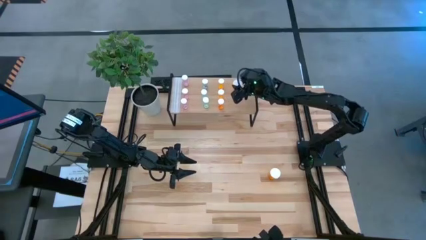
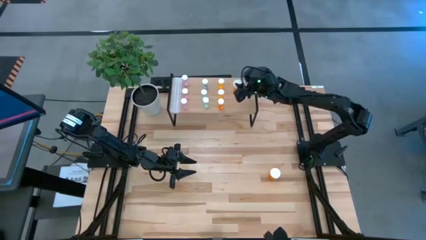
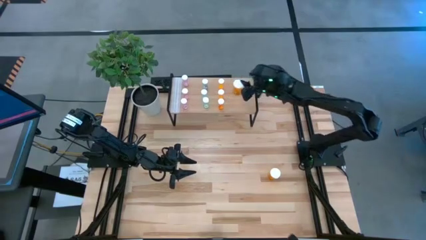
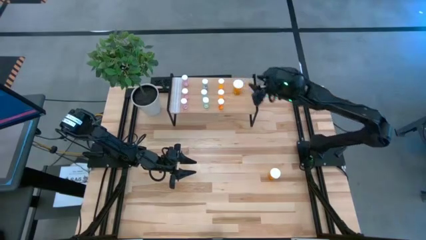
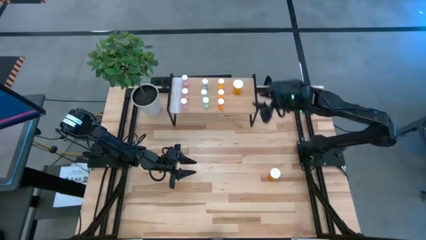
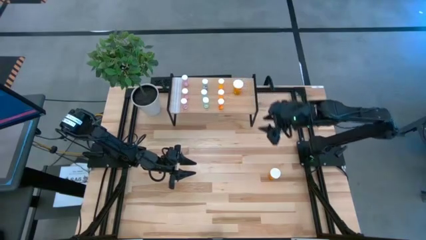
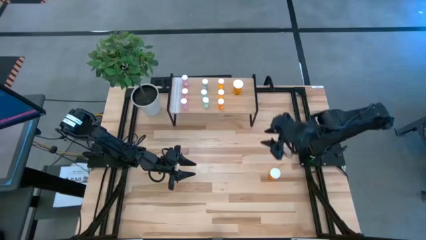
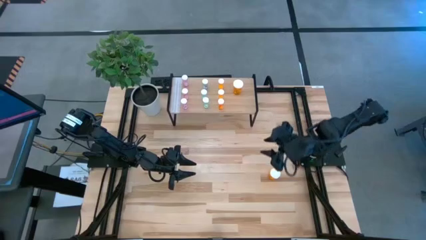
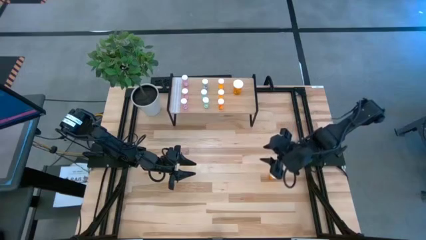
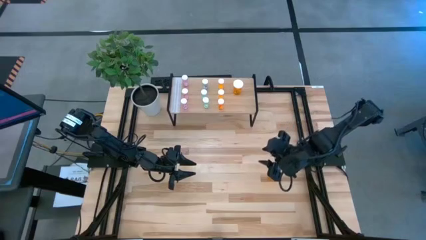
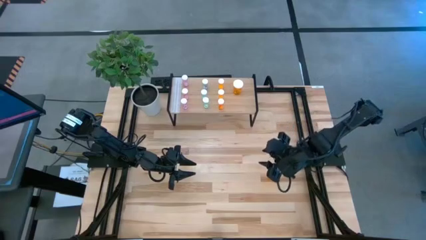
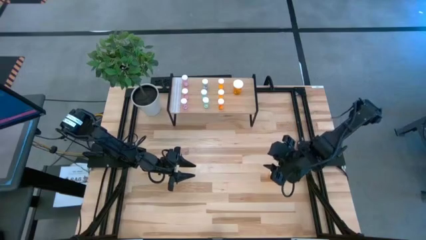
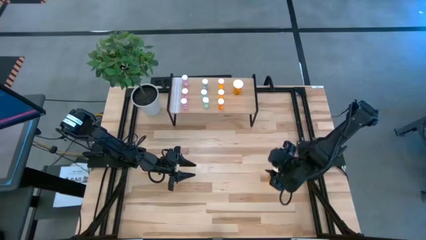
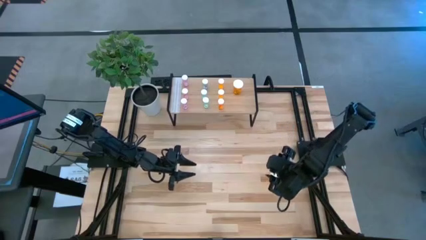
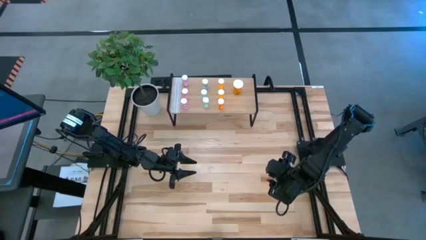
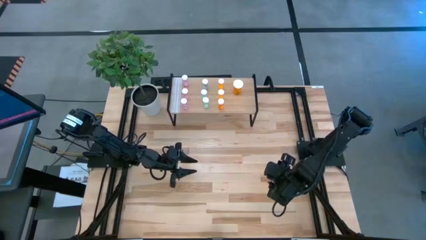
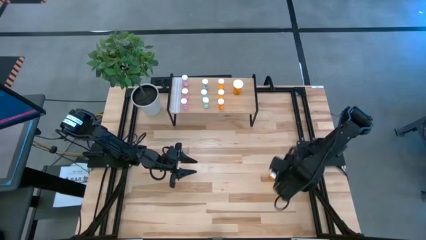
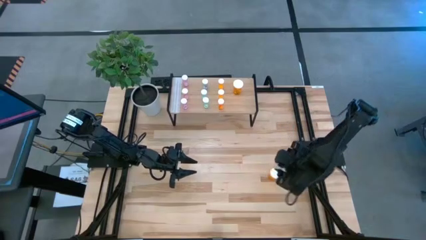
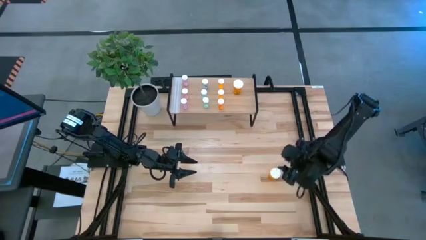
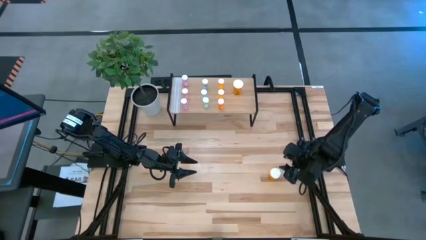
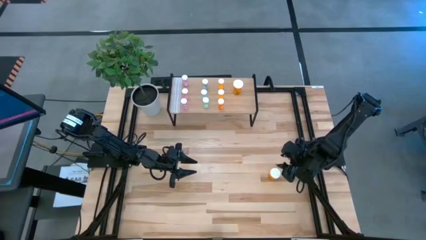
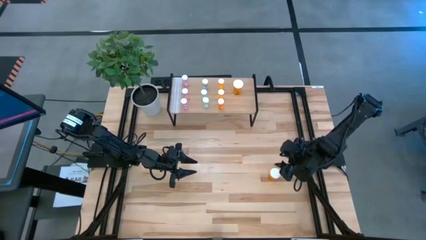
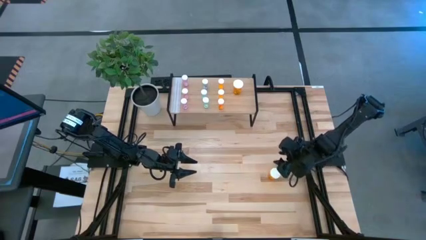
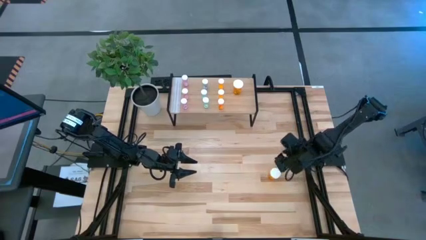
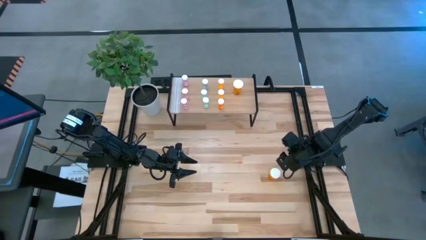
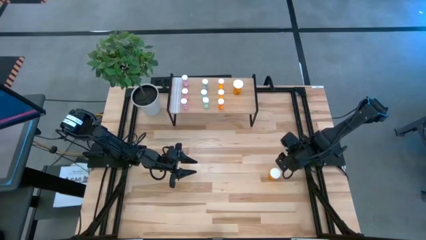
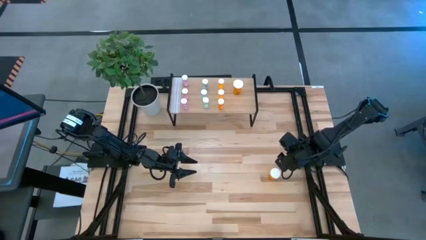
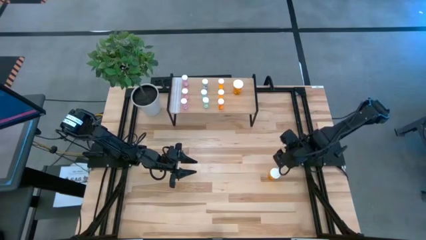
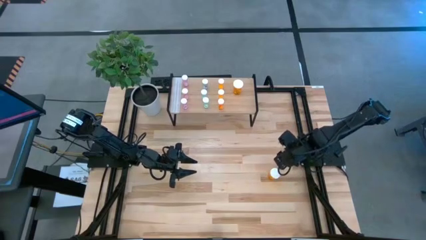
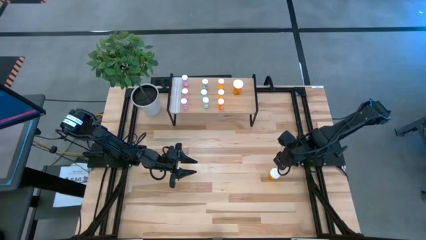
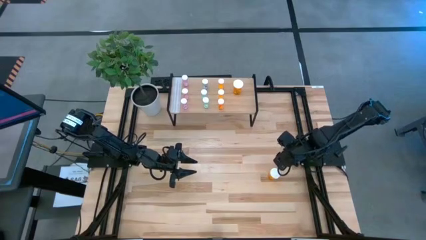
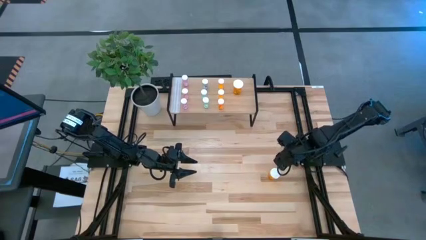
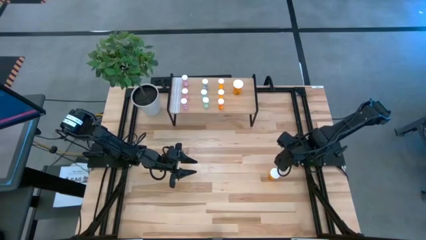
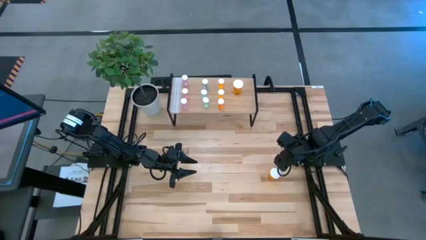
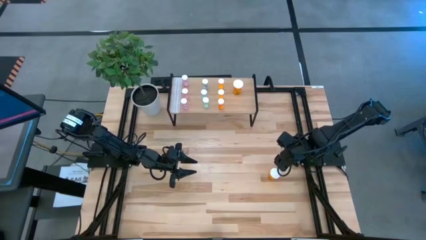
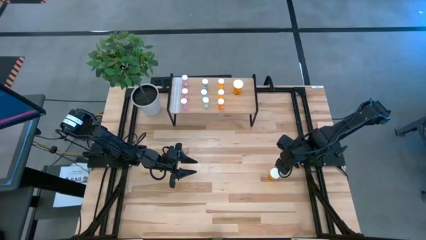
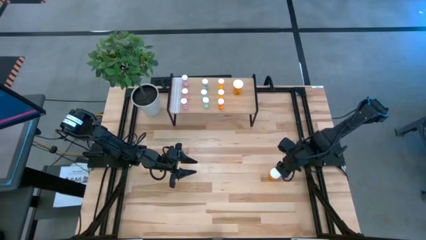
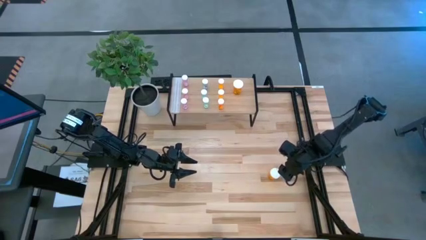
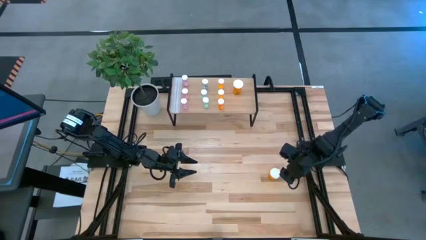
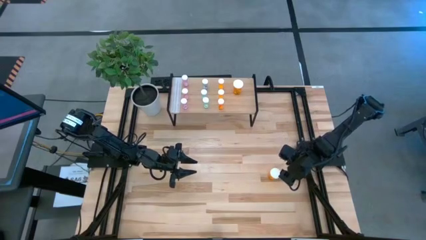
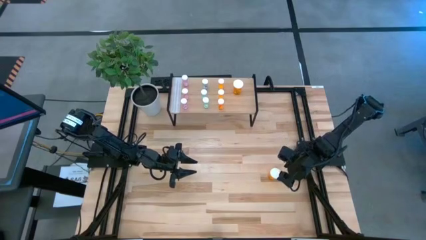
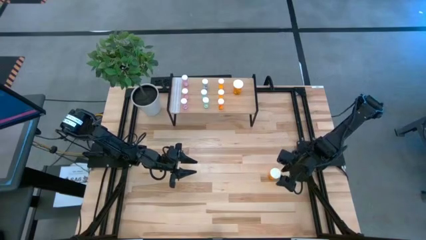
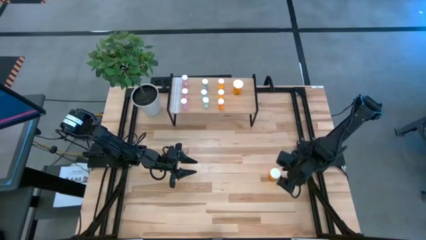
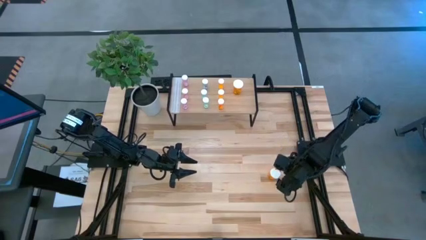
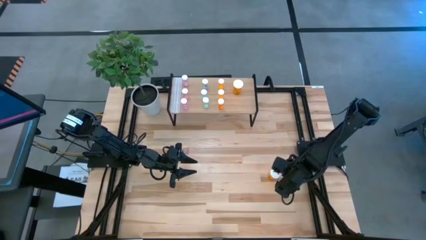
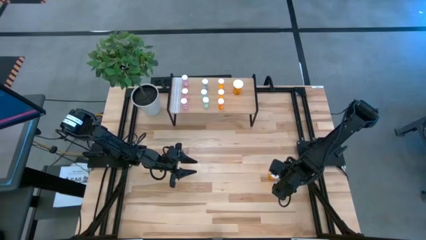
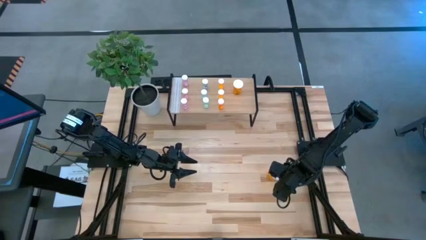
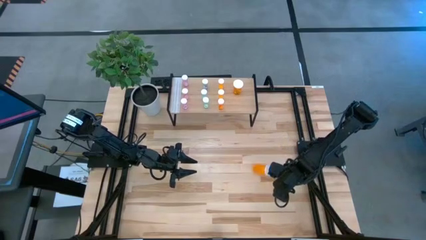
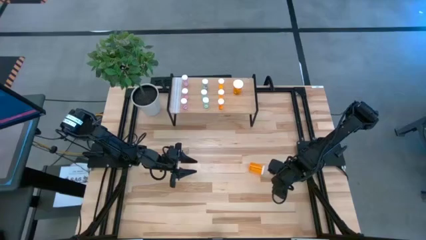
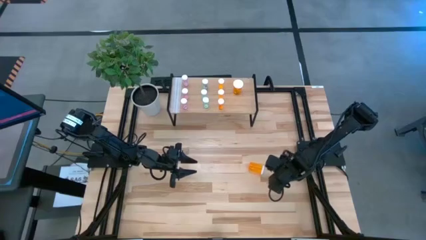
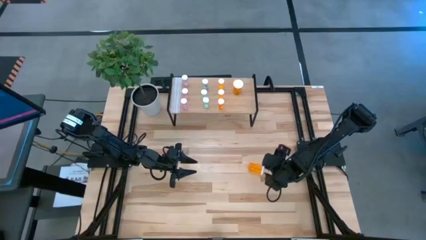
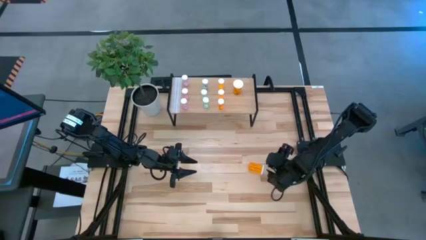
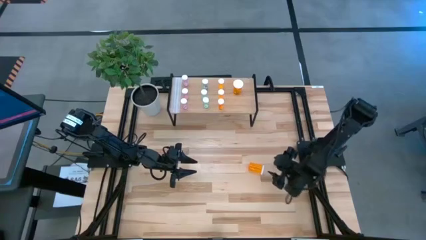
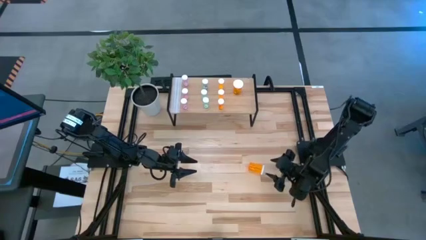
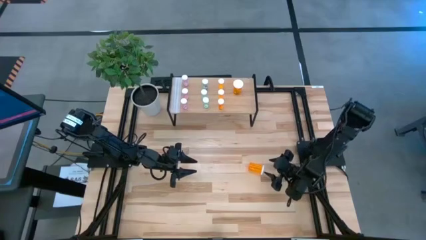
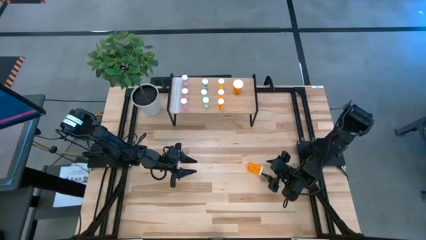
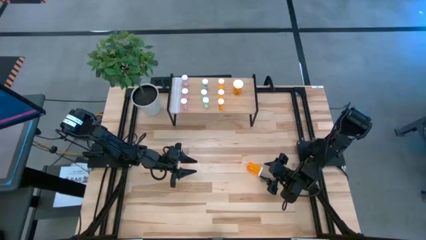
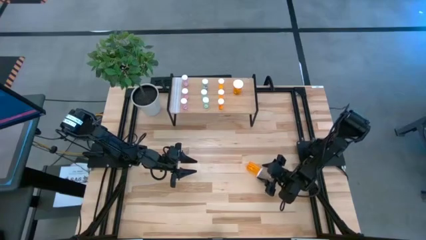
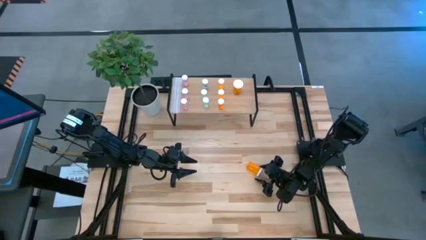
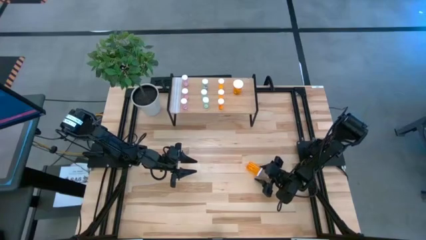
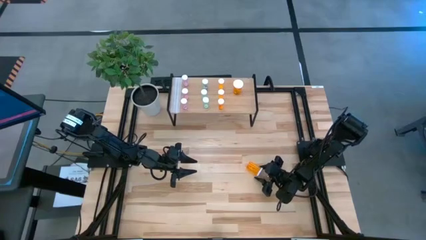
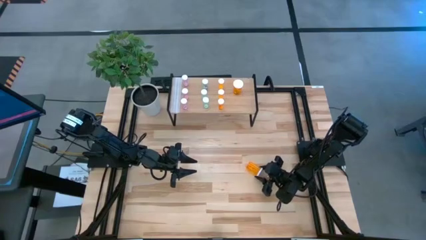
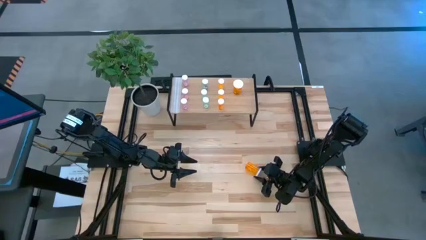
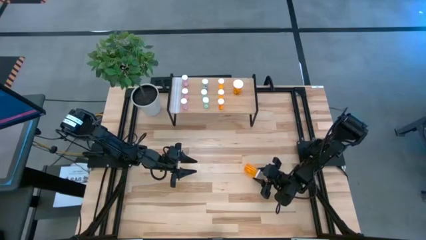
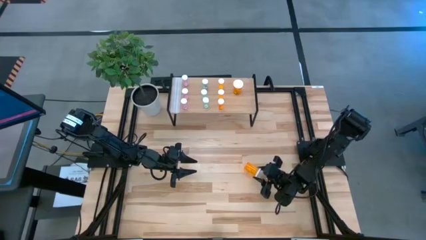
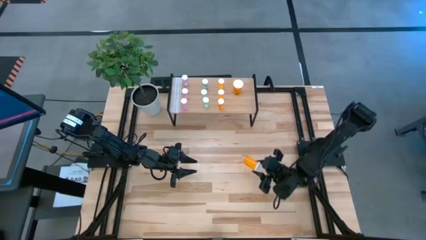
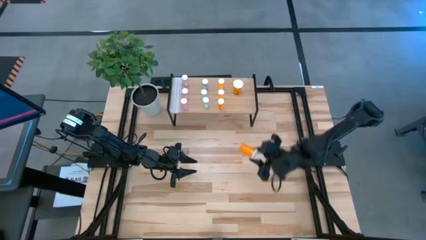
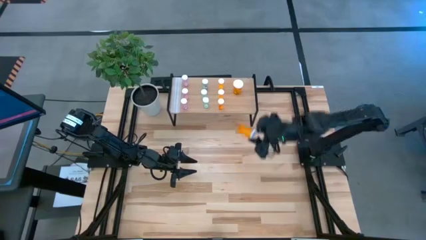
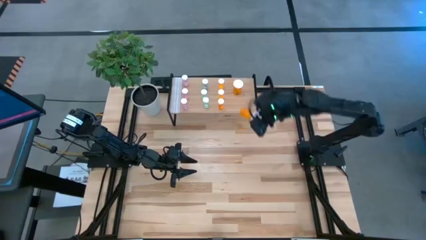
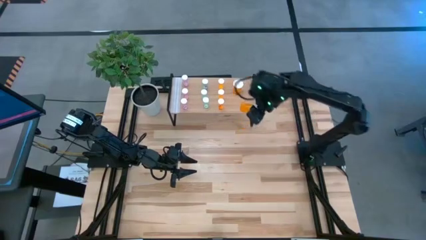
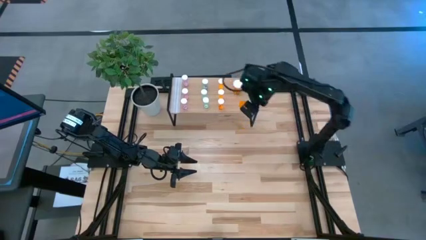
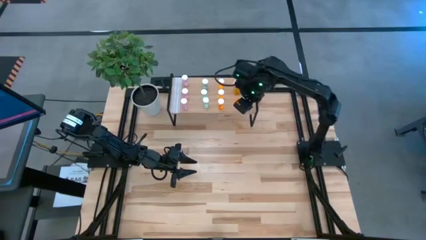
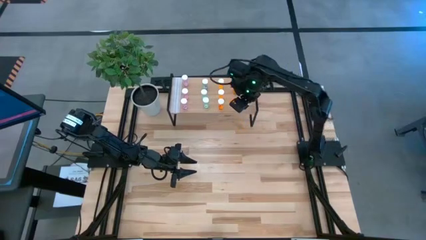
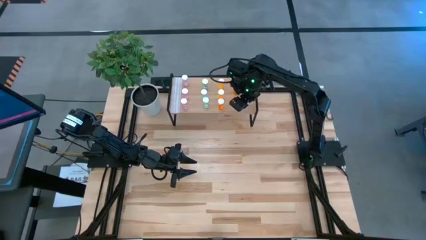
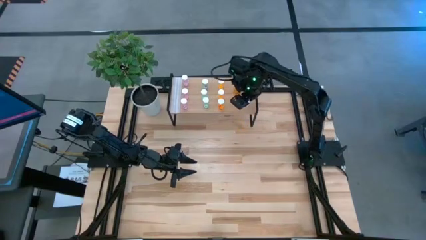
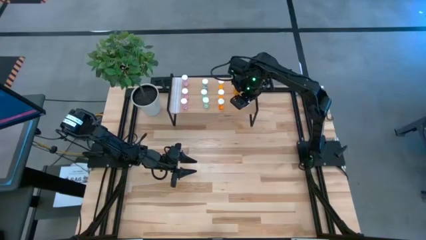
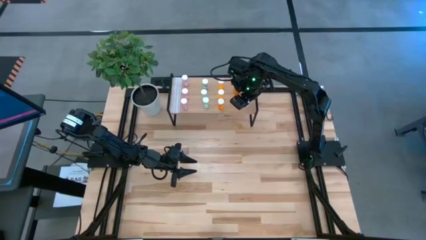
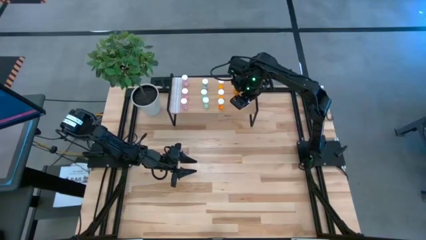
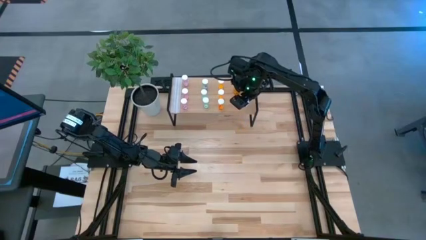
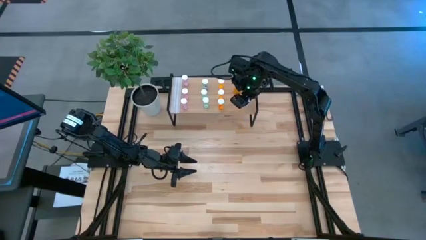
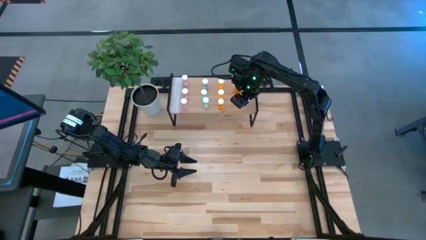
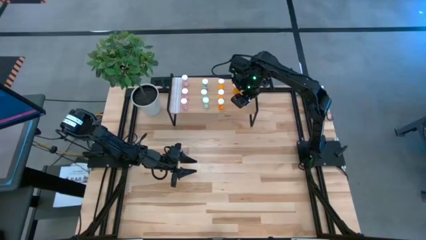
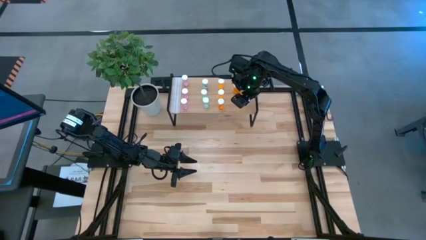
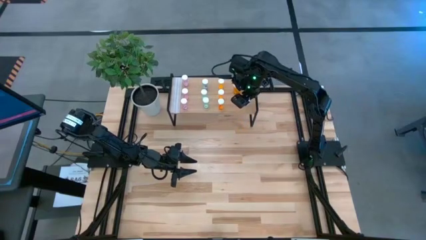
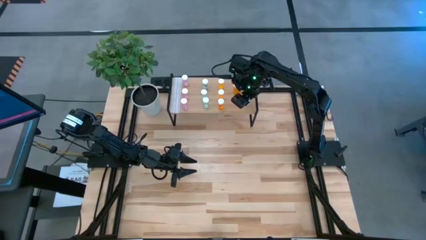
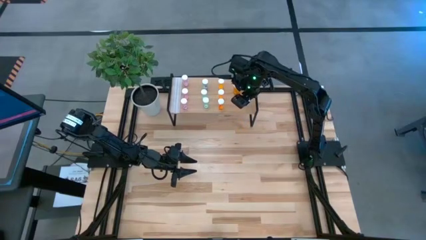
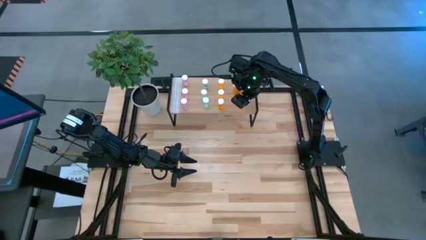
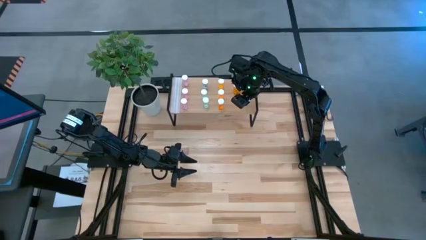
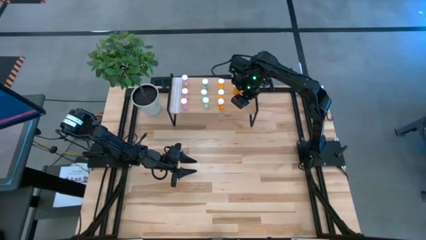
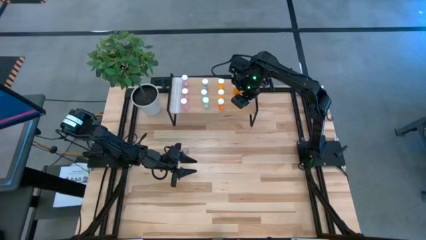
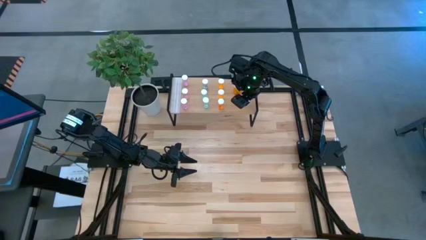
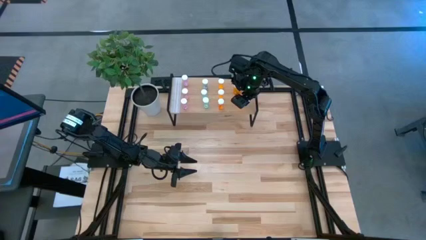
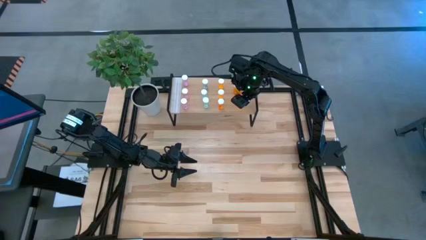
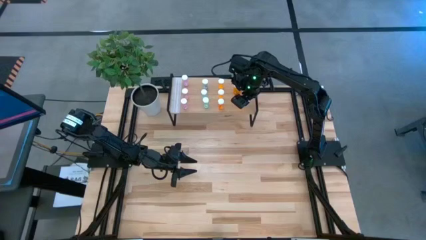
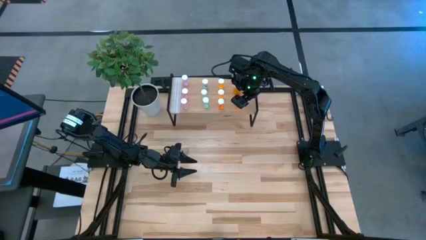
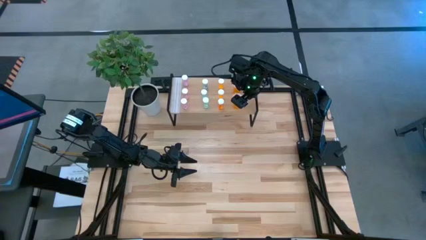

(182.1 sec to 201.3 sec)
Task: Pick and place medicine bottles onto shelf by color
Put the big orange pill bottle aligned with the other big orange pill bottle on the shelf
